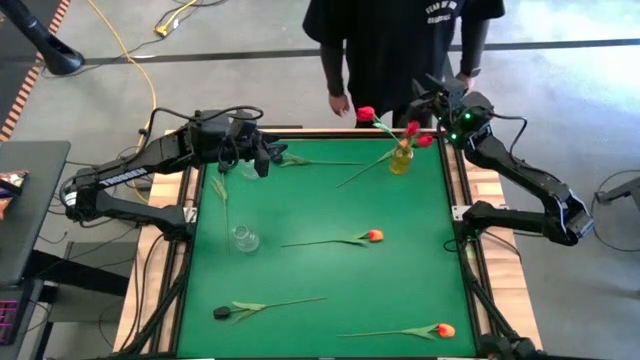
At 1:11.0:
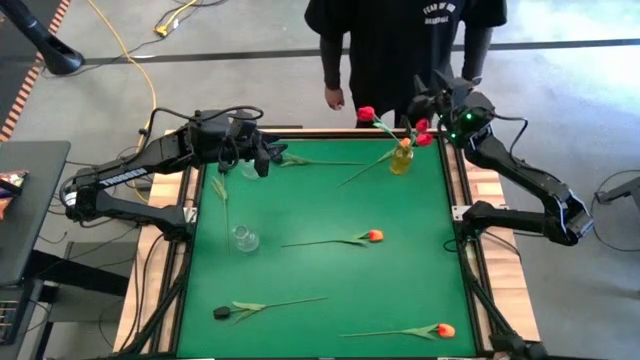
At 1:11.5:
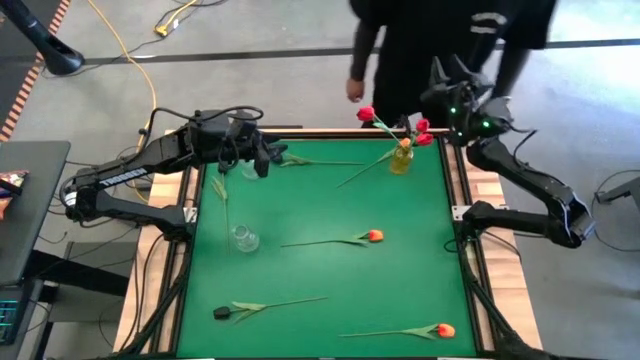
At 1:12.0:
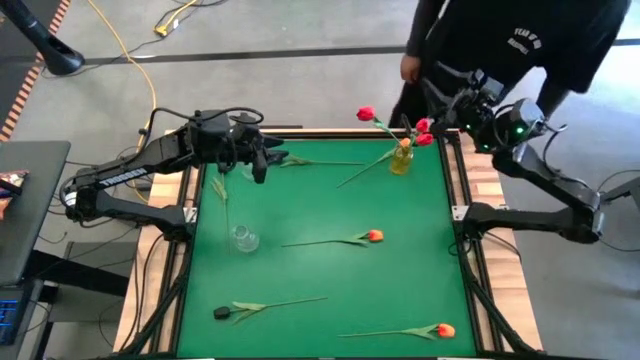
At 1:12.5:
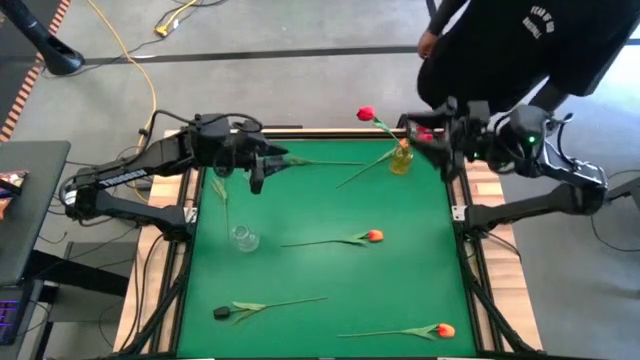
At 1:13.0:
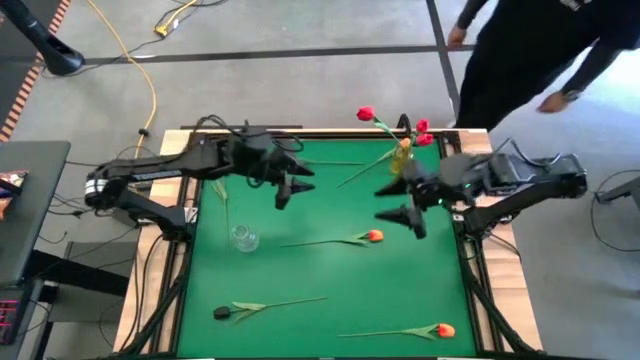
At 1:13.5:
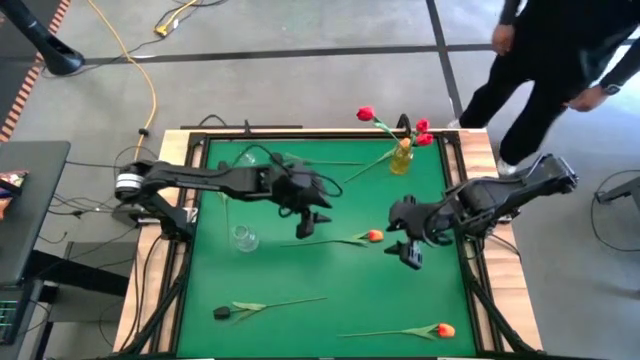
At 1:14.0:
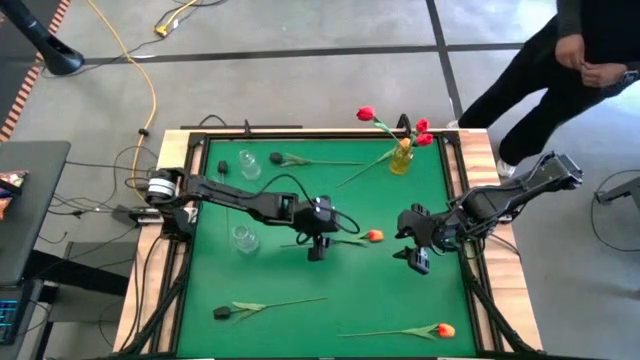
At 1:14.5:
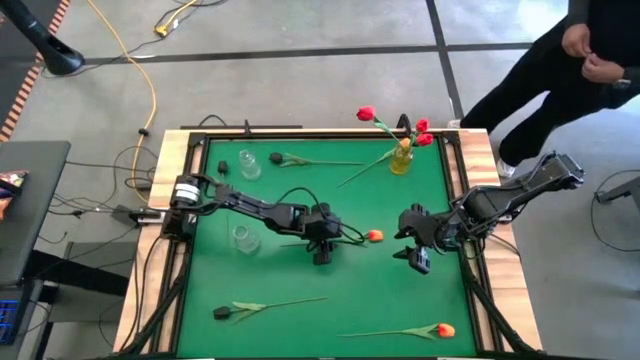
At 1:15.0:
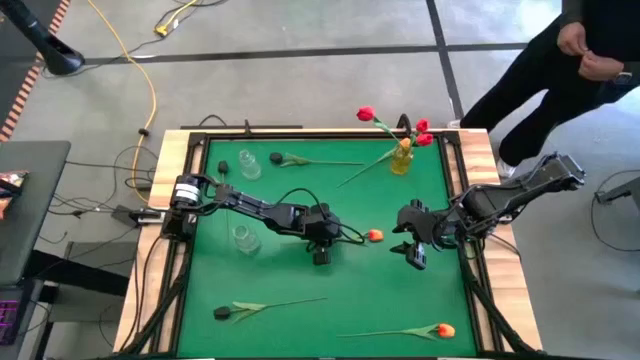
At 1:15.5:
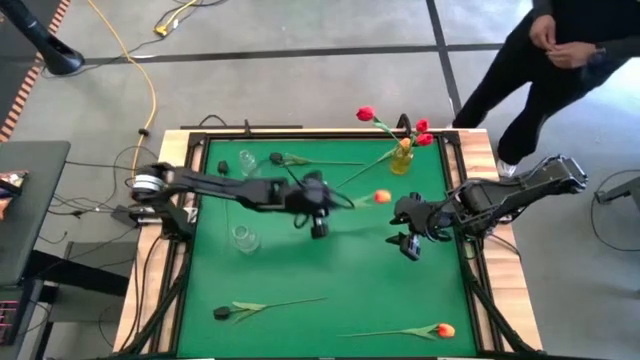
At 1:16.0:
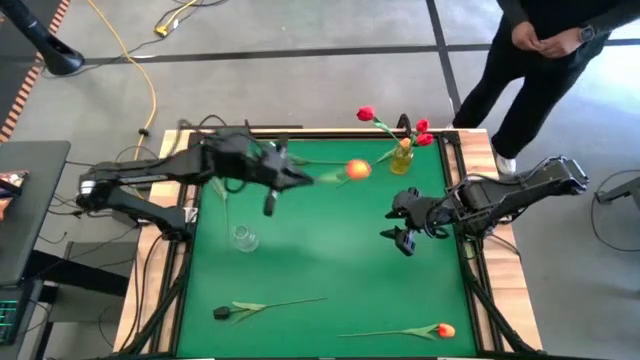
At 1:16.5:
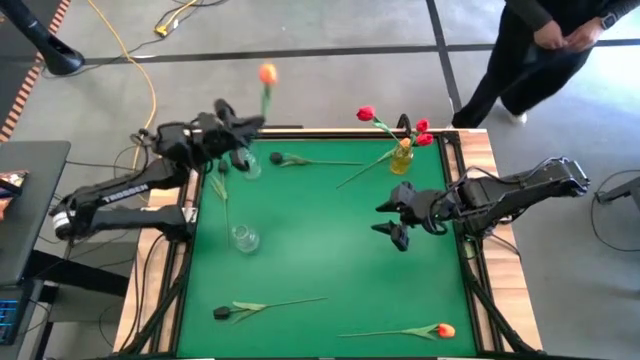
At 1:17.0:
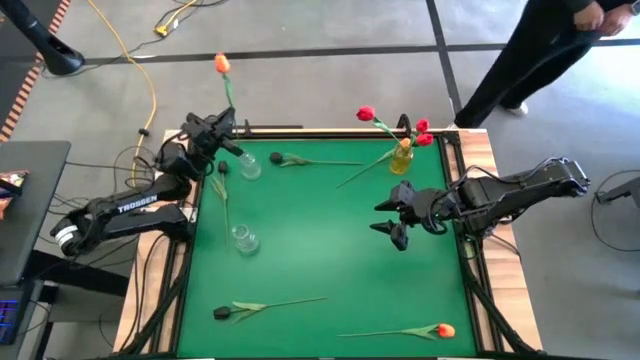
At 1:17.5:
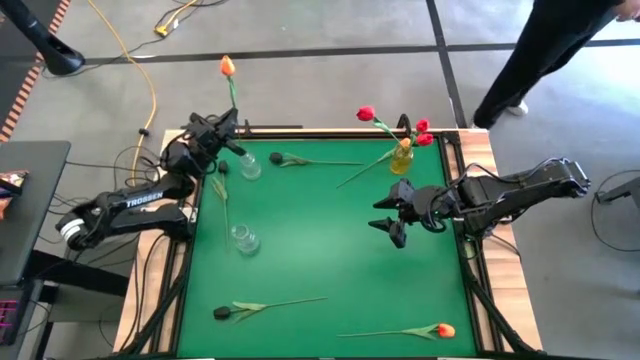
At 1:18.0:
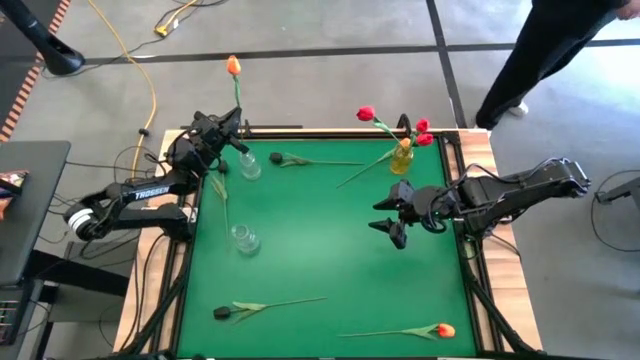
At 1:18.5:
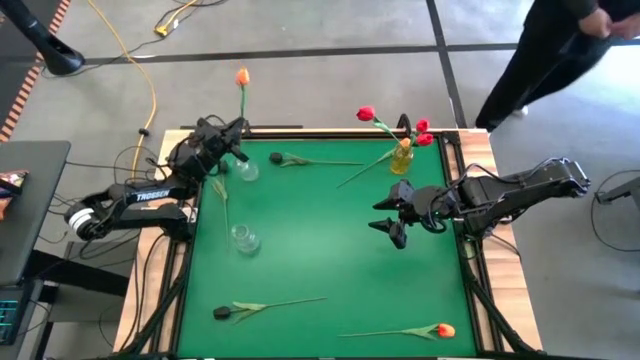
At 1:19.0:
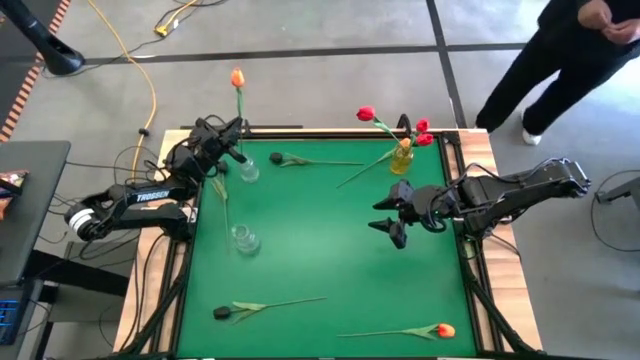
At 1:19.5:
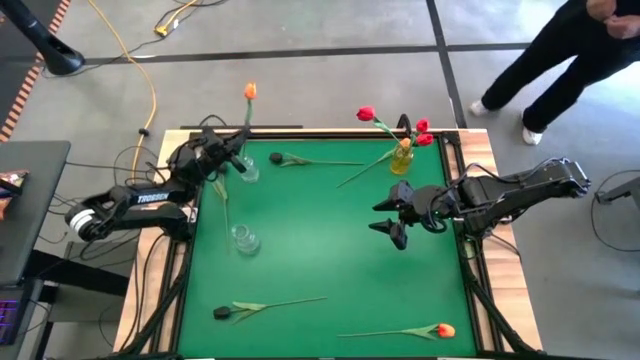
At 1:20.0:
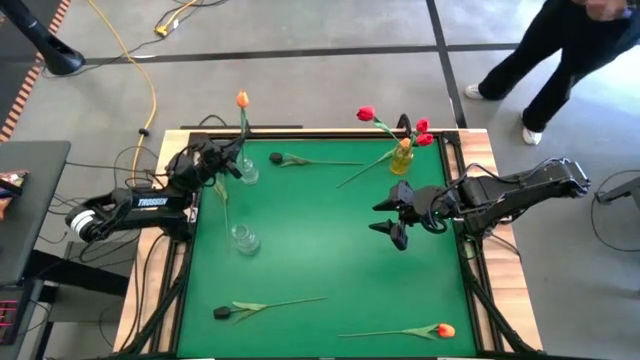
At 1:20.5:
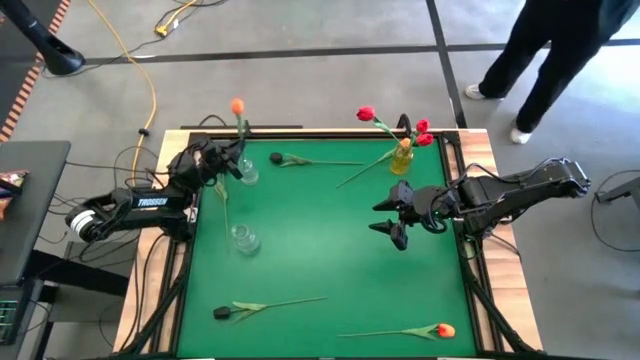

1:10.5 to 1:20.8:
Task: Sort flowers into vase by color
Put the middle orange flower into the top transparent vase

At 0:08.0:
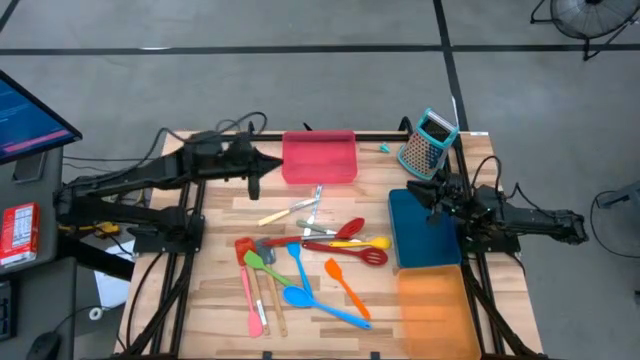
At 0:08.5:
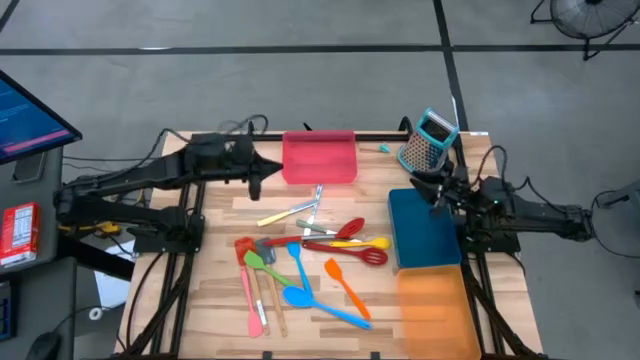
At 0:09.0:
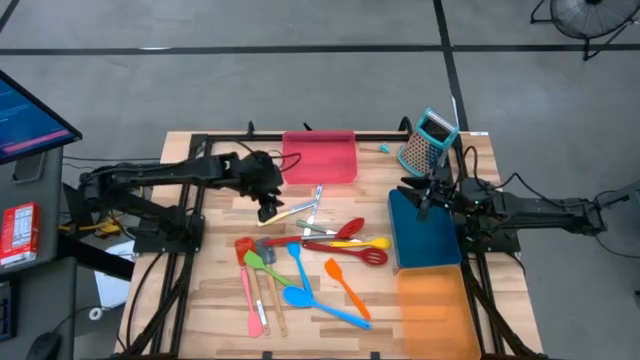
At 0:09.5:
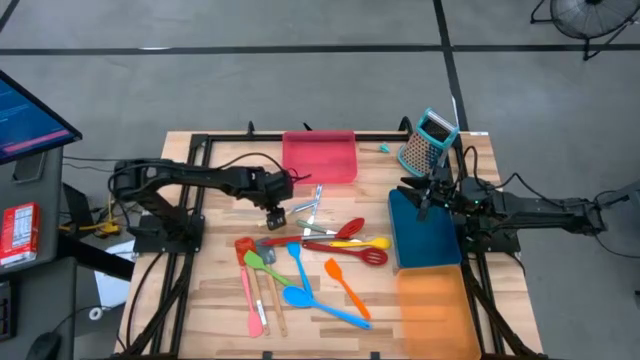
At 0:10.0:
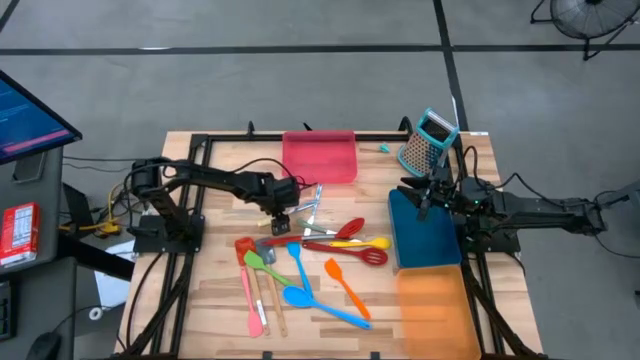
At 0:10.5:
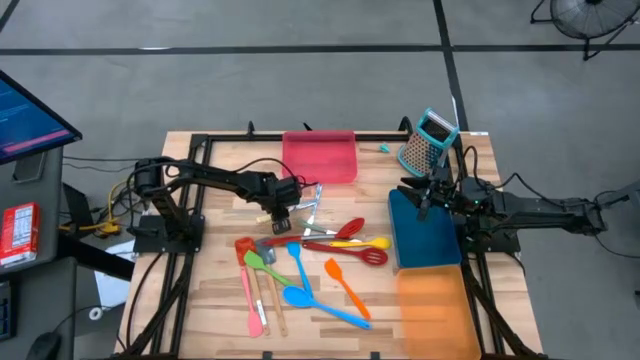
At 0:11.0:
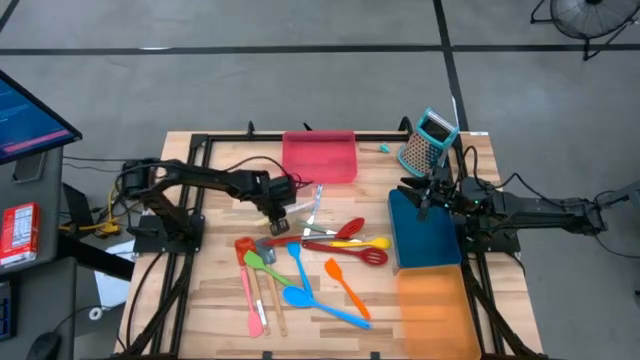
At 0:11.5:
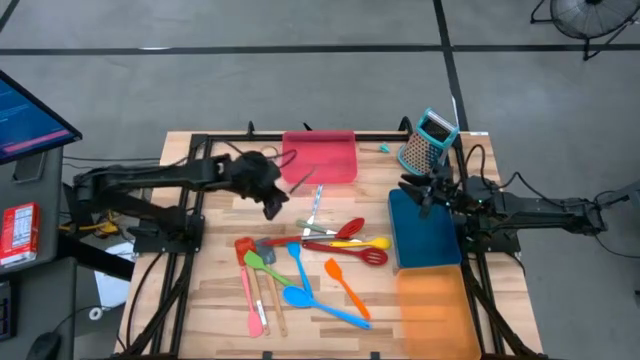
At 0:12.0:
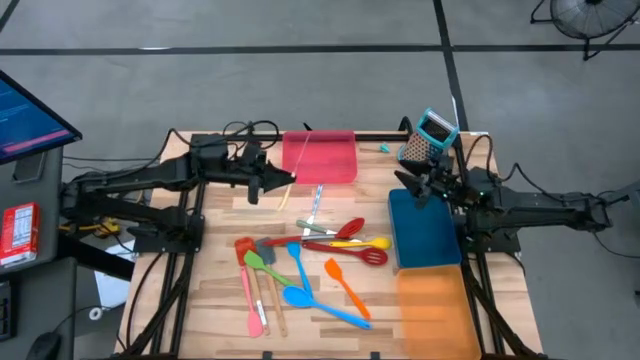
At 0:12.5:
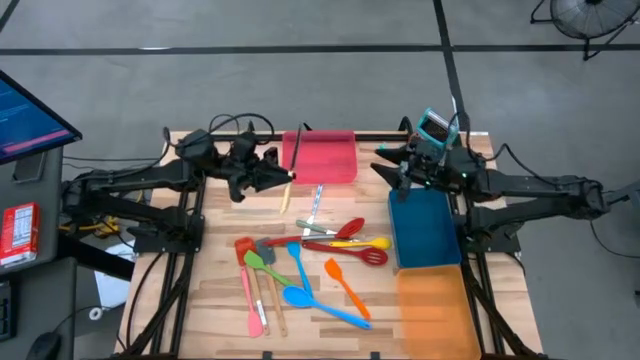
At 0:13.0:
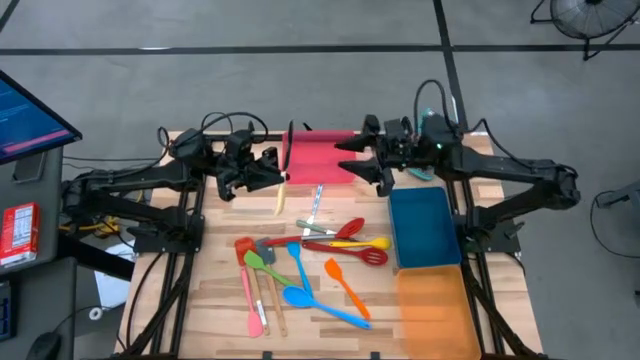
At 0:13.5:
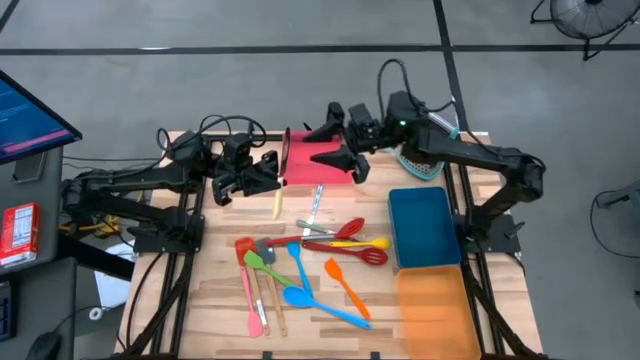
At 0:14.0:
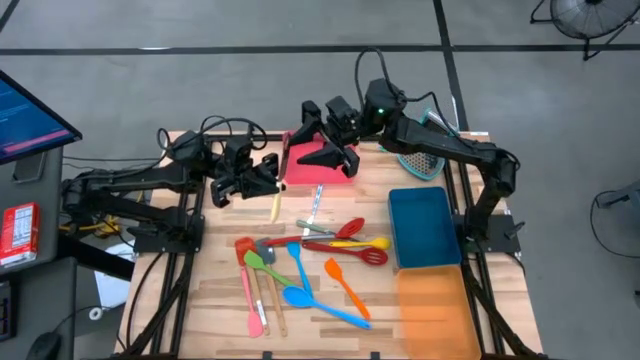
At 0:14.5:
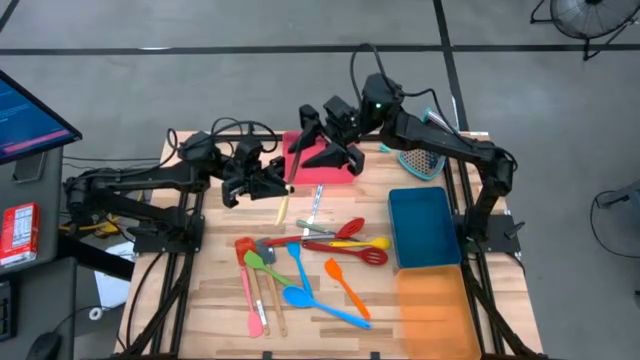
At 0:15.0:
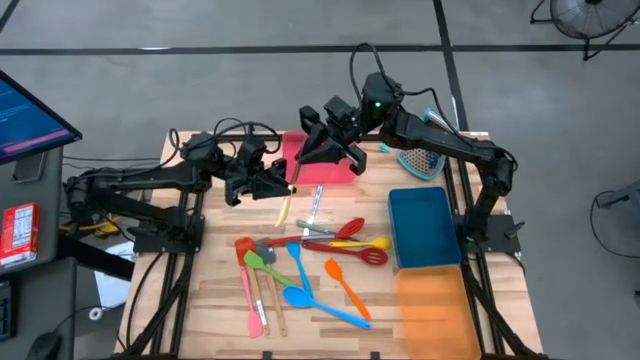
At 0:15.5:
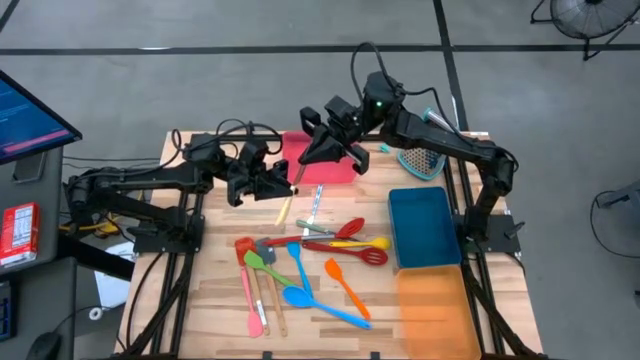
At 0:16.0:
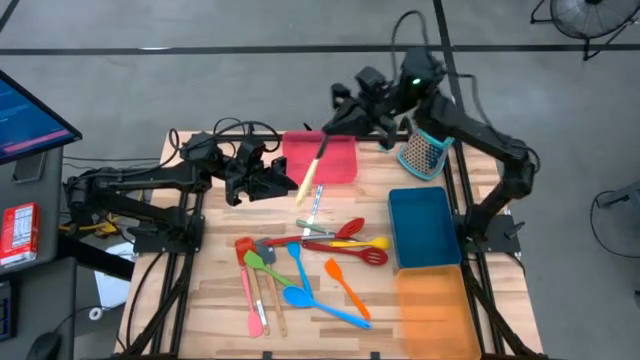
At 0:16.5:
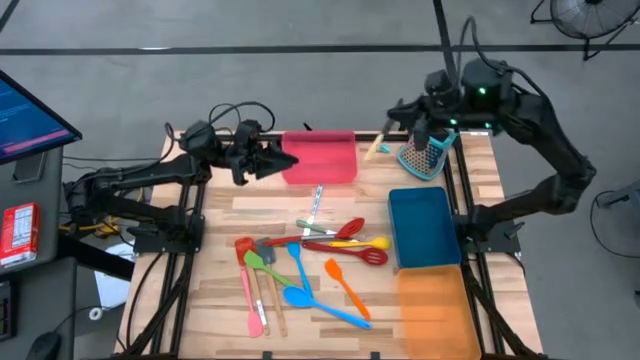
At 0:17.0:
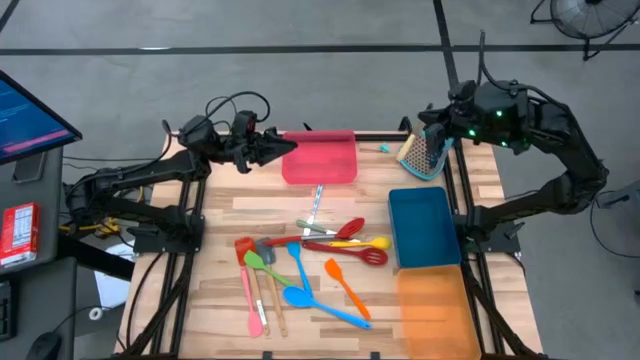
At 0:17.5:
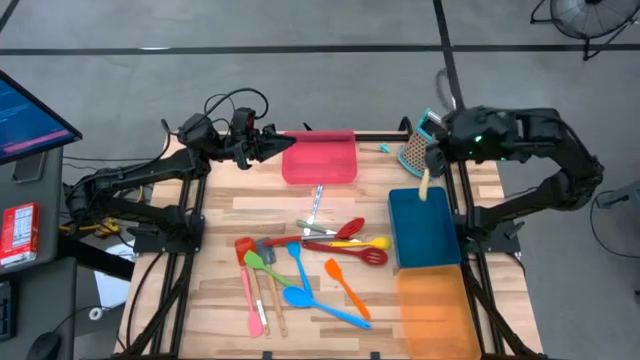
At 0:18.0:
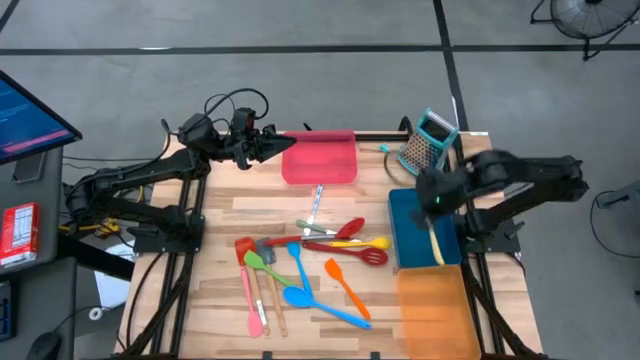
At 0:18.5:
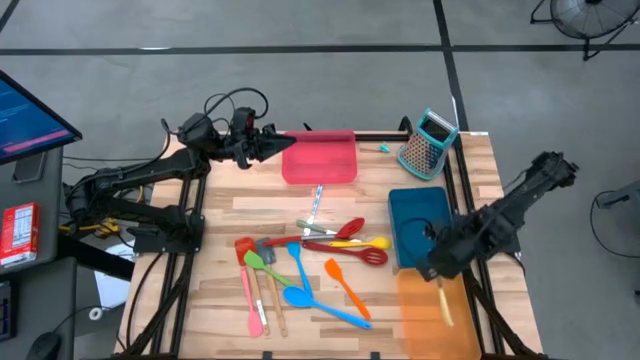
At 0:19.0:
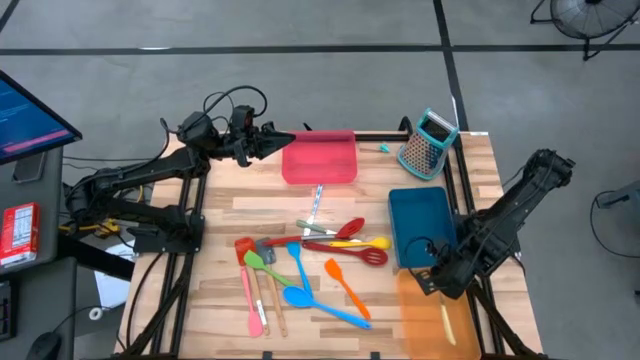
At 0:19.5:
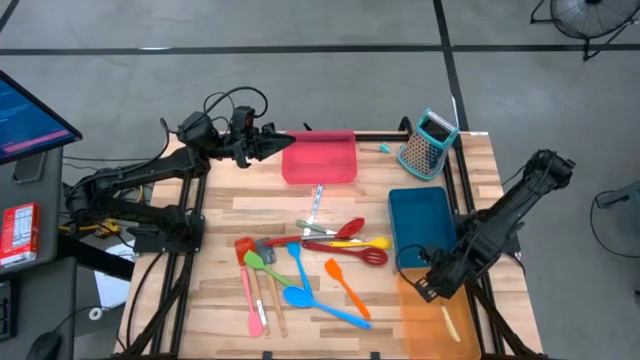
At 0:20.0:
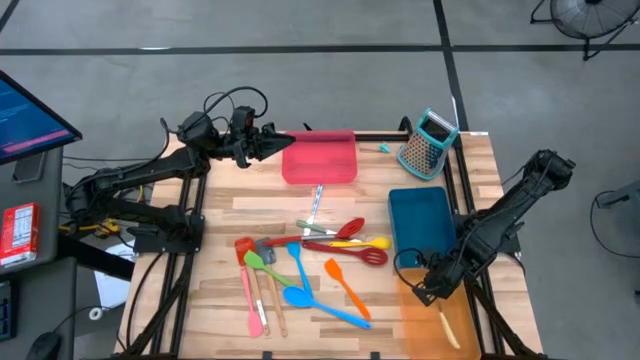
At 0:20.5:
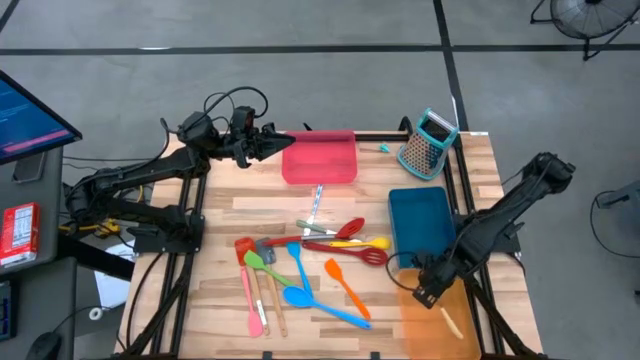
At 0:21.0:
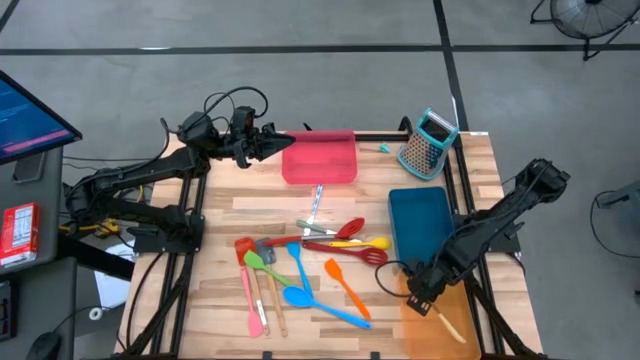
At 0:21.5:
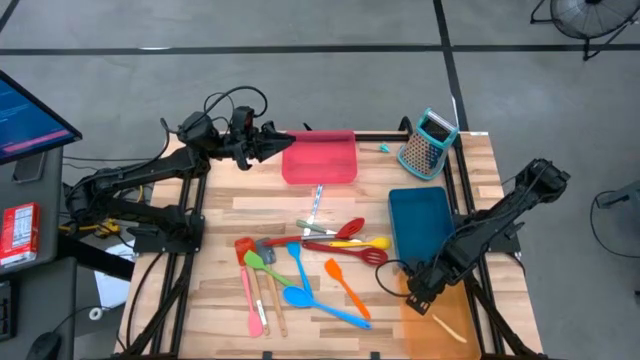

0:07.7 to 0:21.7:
Task: Pick & Place Kitchen Items
Put the yellow kitchen knife into the orange bin
